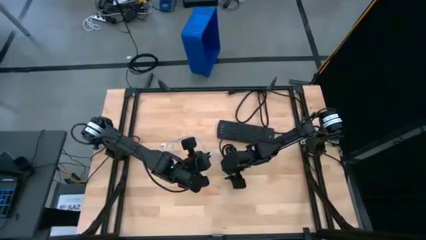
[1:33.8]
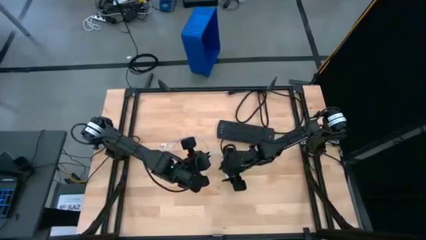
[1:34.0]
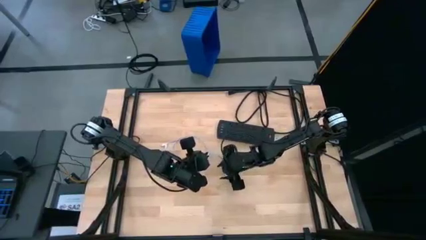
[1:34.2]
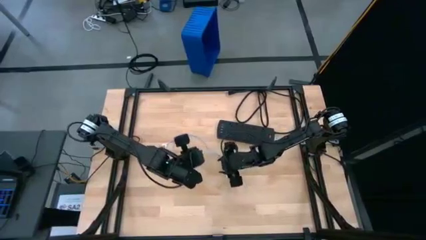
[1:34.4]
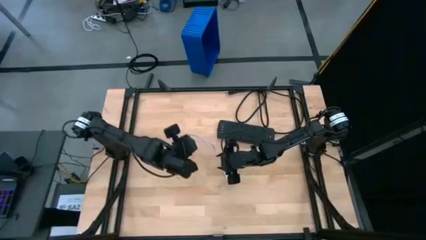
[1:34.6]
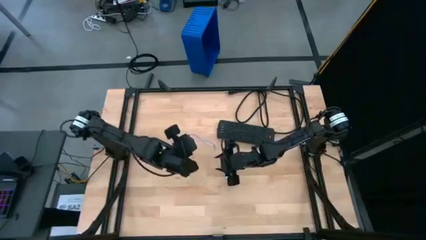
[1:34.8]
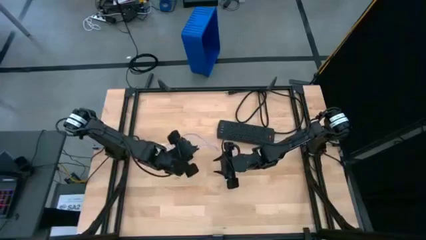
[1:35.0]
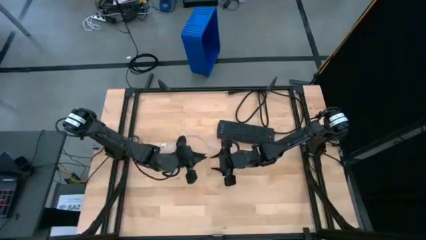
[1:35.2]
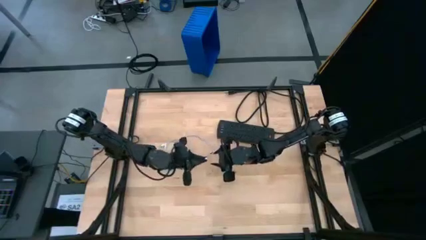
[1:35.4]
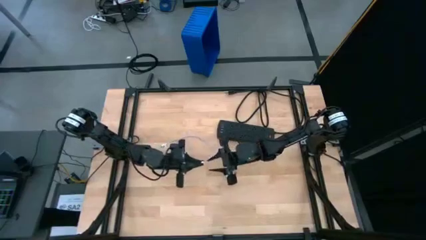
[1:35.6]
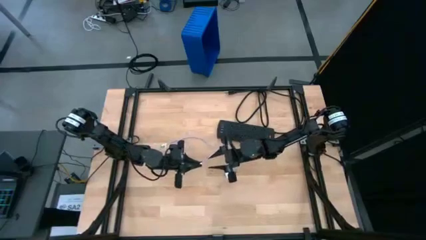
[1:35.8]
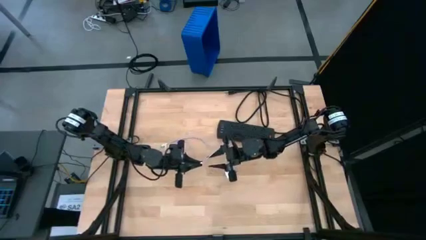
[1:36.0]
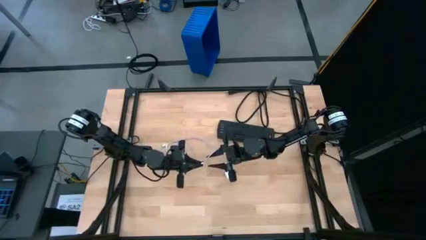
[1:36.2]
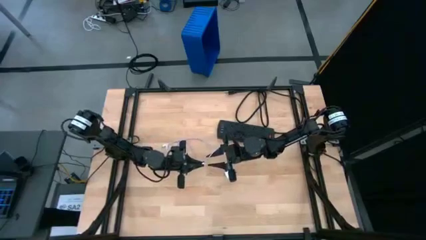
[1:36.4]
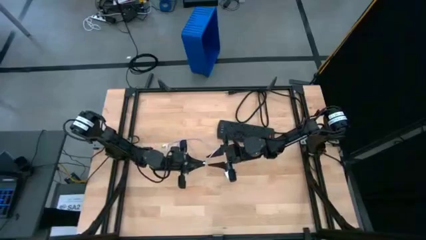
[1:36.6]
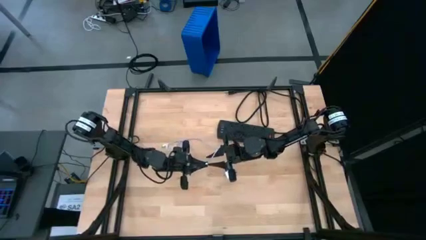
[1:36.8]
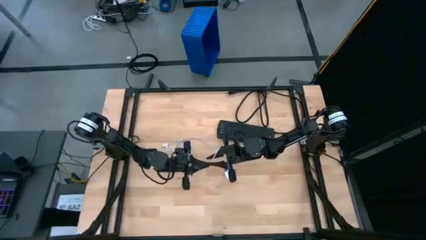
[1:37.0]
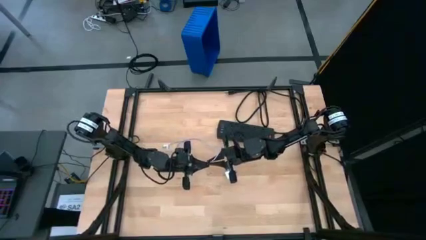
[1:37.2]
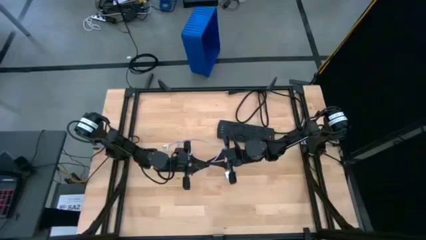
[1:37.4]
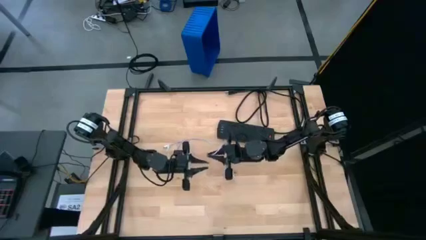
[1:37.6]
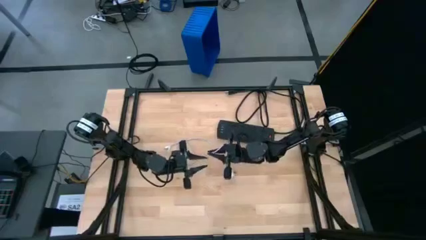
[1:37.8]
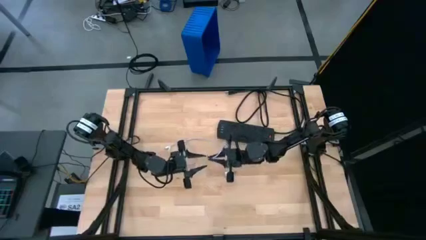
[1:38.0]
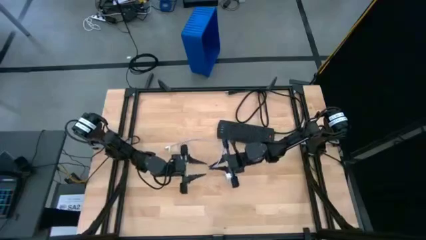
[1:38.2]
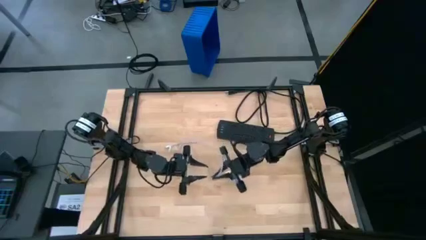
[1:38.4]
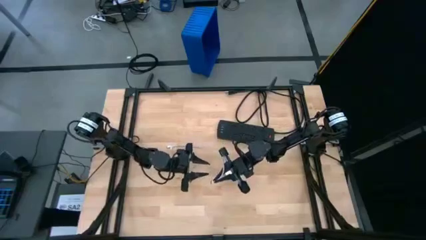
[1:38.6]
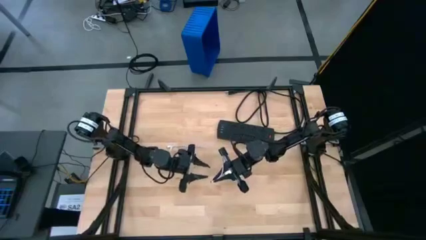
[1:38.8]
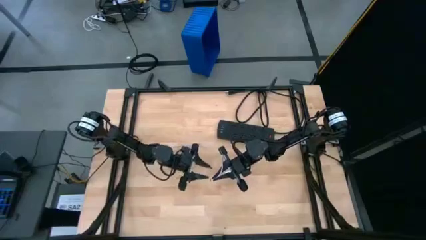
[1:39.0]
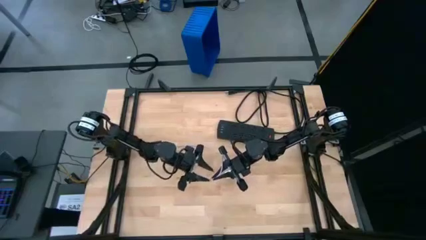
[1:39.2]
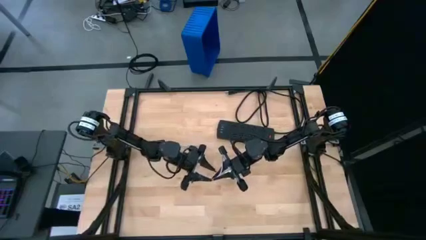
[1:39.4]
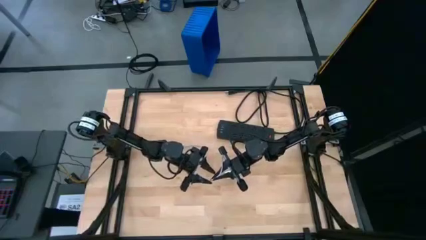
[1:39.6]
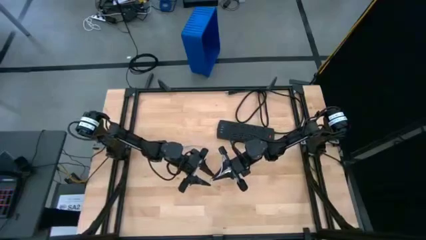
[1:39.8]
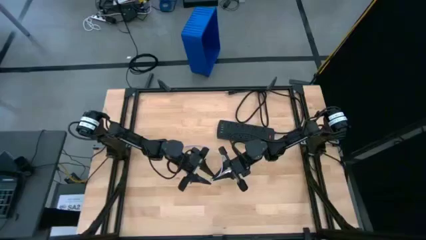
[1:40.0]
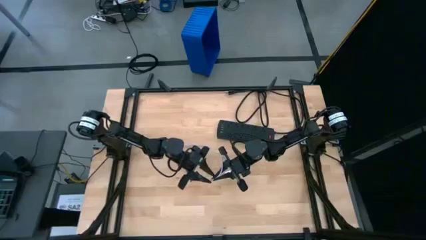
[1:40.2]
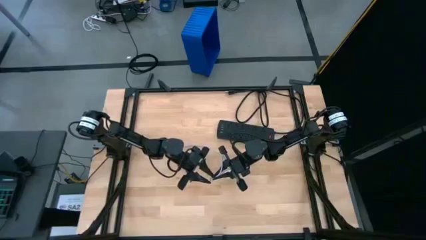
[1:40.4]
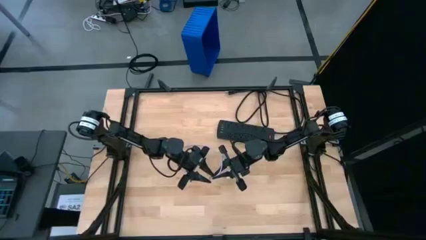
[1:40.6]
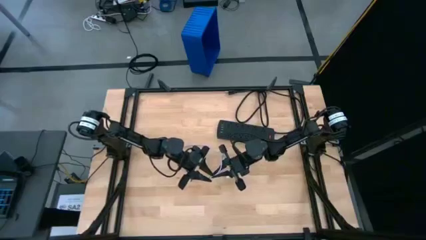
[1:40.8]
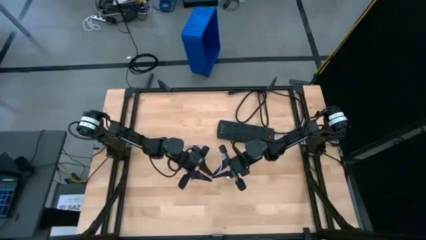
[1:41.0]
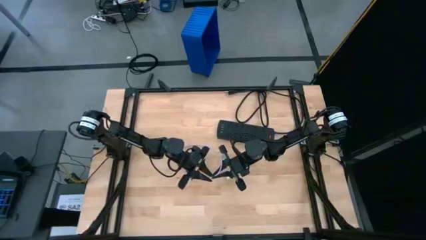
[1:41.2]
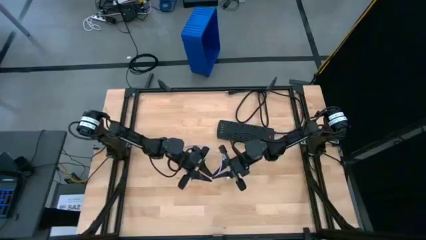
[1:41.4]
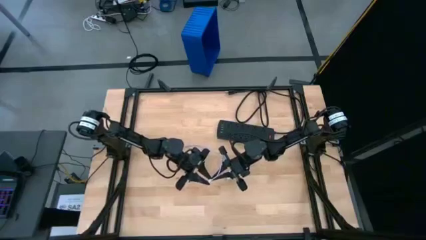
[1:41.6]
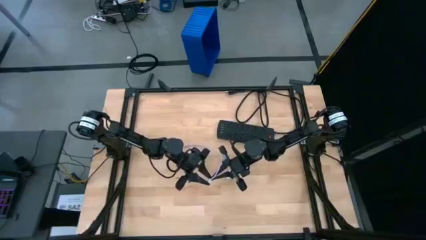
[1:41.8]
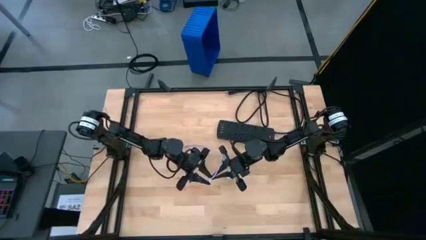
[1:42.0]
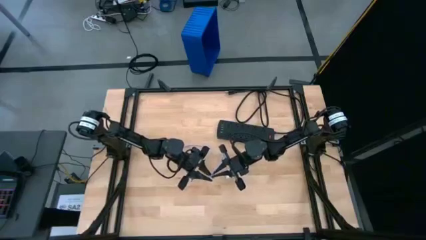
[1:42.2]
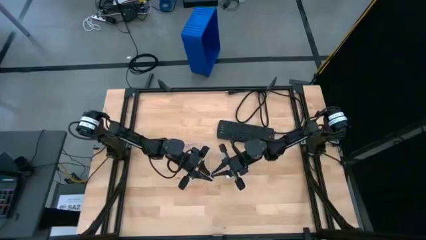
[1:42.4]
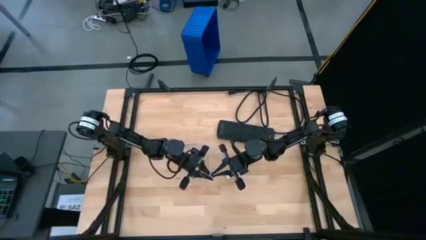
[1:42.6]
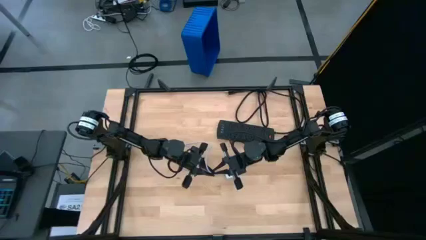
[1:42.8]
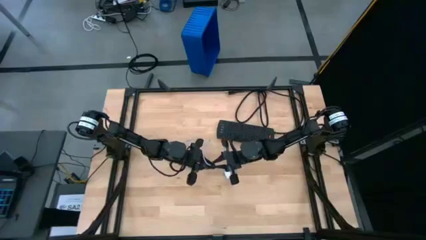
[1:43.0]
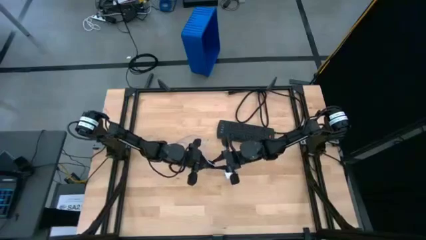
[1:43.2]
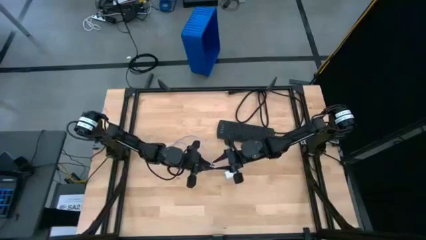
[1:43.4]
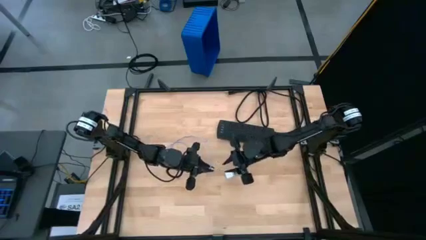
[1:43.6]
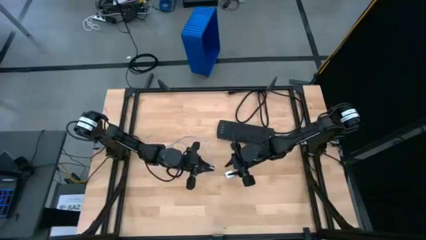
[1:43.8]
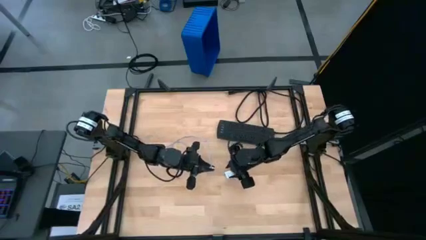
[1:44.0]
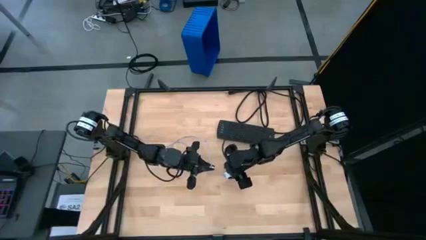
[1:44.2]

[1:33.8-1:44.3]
Task: Insert USB
Insert the white charger cable into the white charger adapter

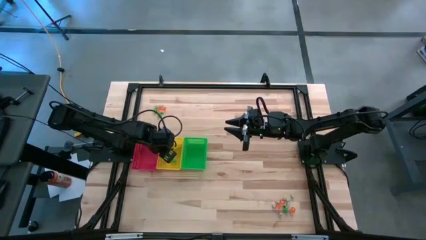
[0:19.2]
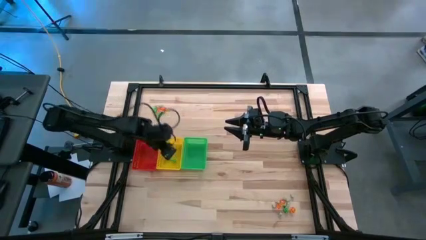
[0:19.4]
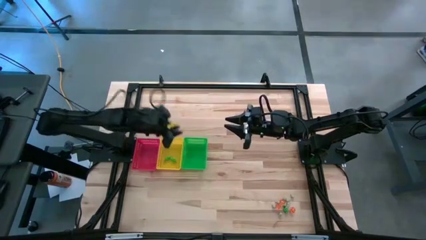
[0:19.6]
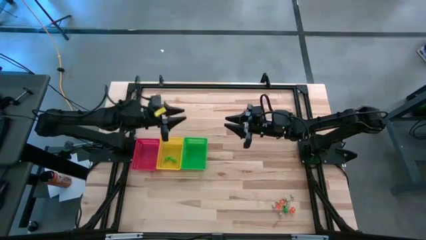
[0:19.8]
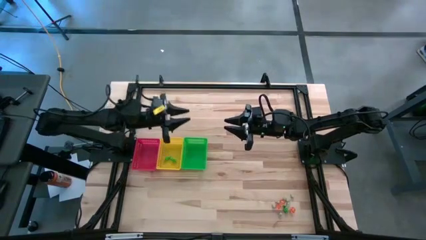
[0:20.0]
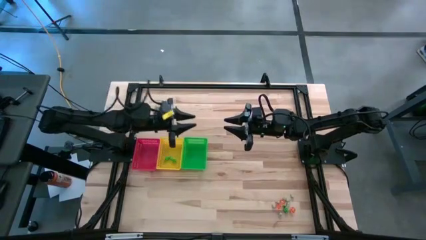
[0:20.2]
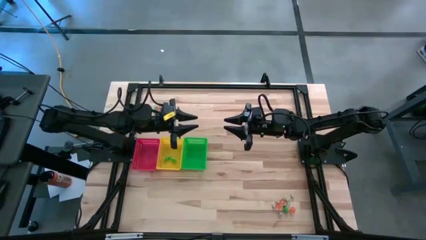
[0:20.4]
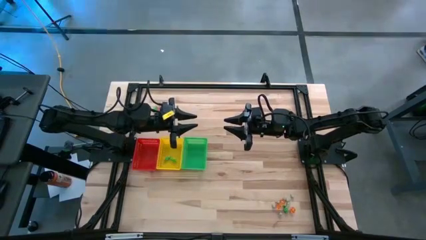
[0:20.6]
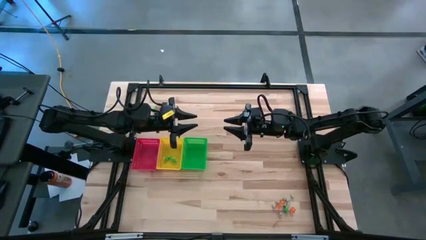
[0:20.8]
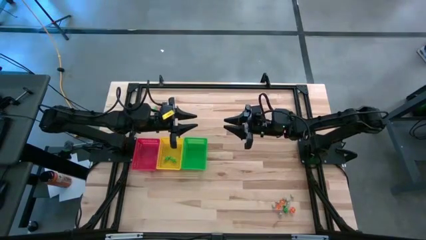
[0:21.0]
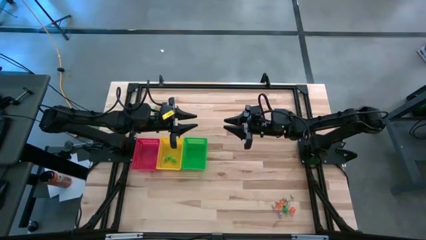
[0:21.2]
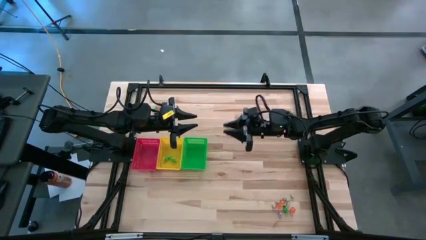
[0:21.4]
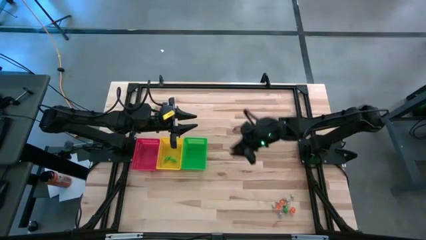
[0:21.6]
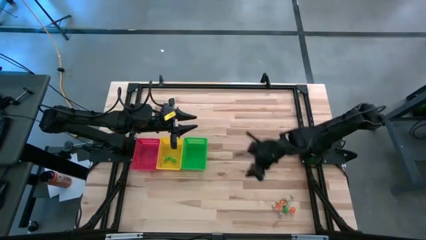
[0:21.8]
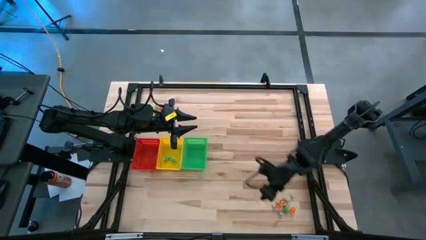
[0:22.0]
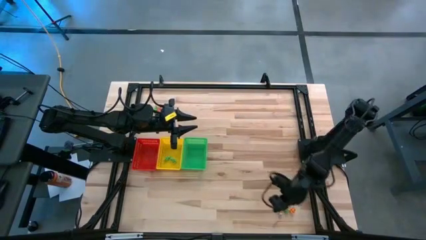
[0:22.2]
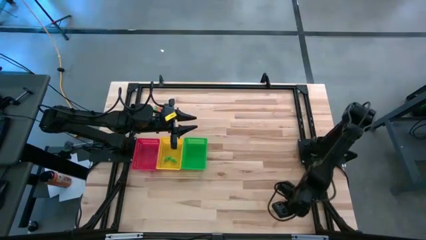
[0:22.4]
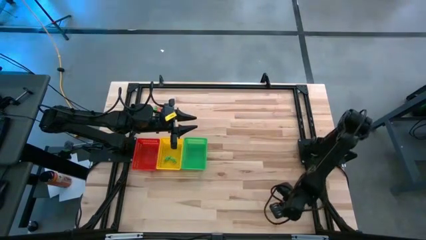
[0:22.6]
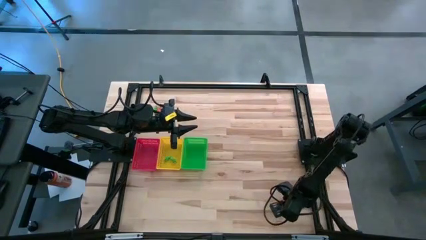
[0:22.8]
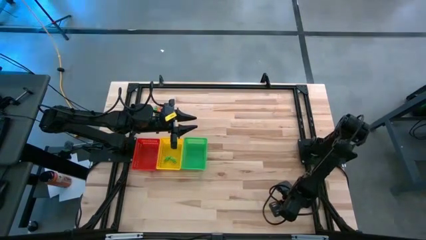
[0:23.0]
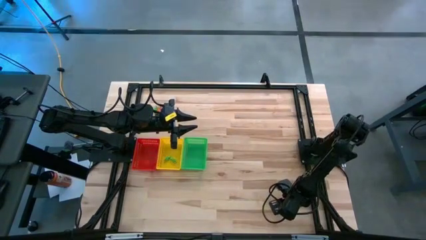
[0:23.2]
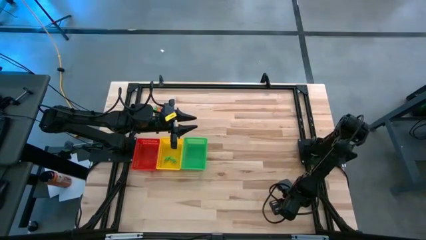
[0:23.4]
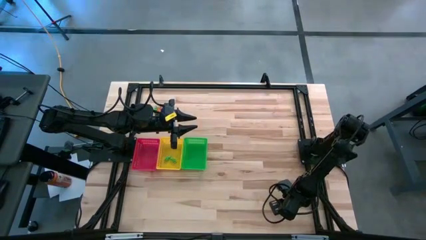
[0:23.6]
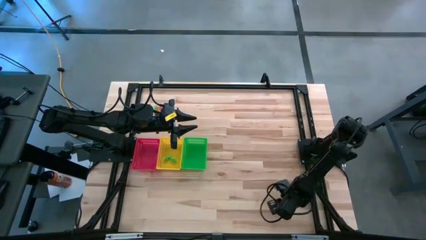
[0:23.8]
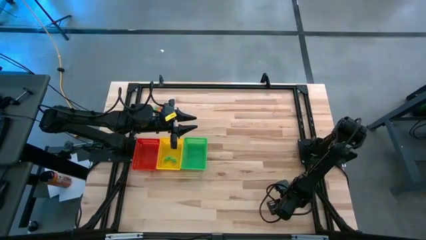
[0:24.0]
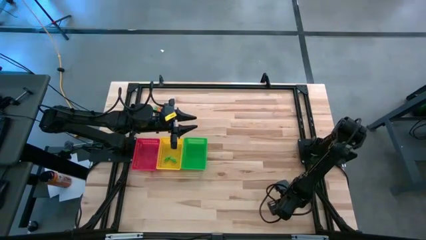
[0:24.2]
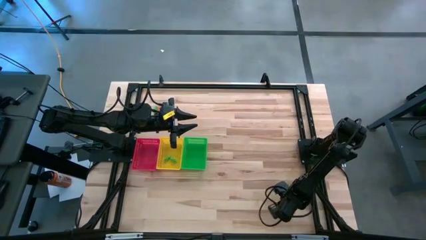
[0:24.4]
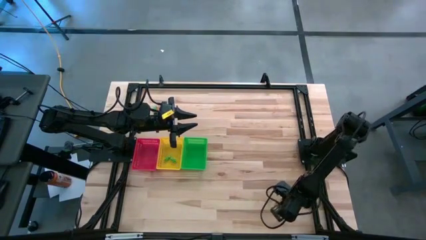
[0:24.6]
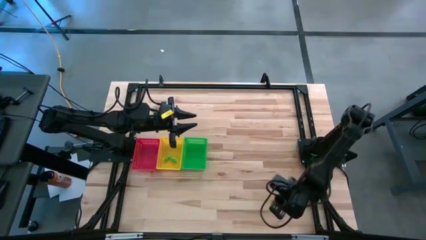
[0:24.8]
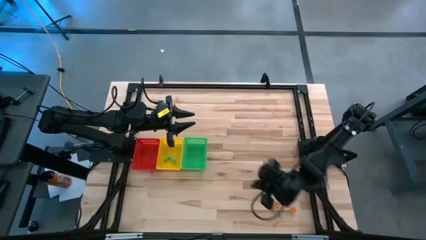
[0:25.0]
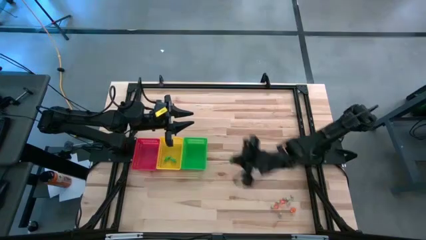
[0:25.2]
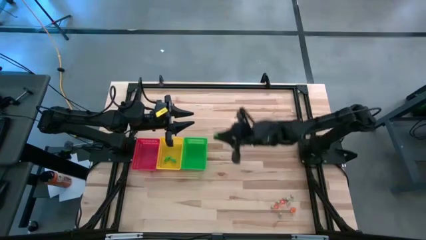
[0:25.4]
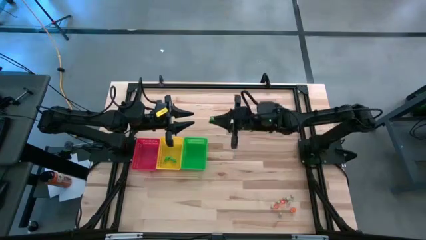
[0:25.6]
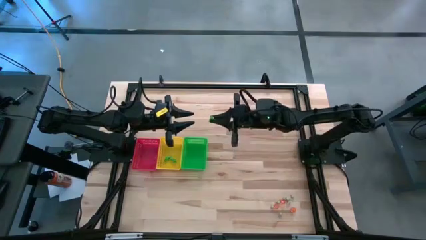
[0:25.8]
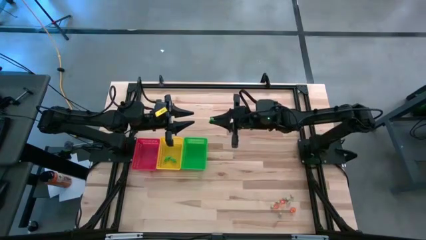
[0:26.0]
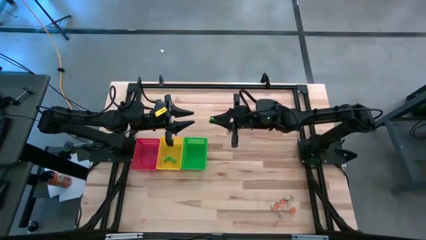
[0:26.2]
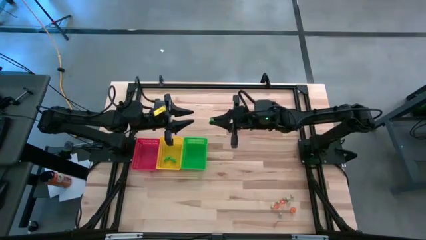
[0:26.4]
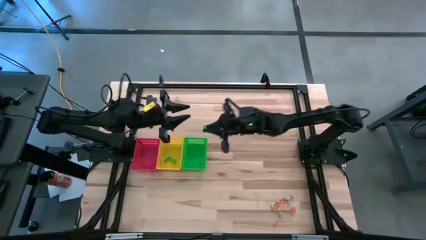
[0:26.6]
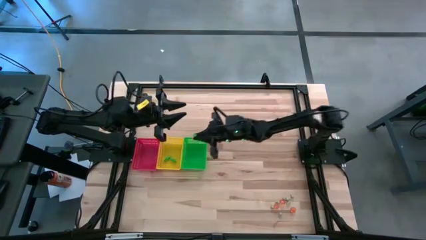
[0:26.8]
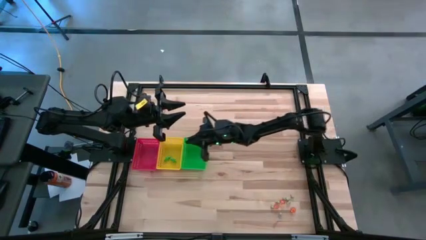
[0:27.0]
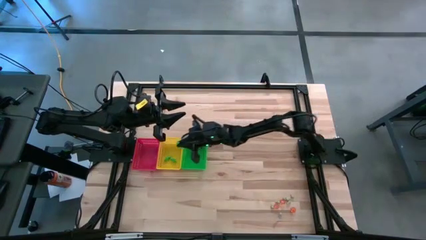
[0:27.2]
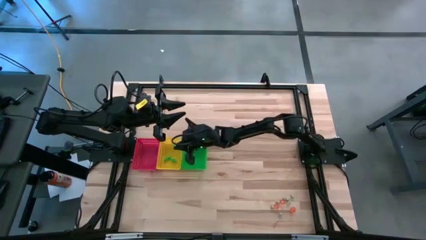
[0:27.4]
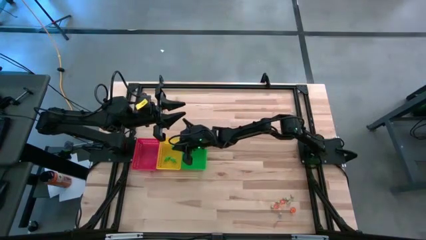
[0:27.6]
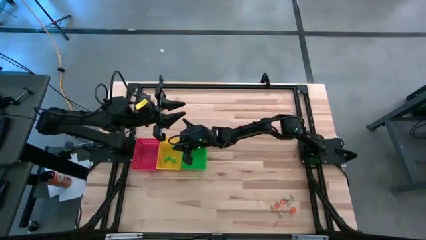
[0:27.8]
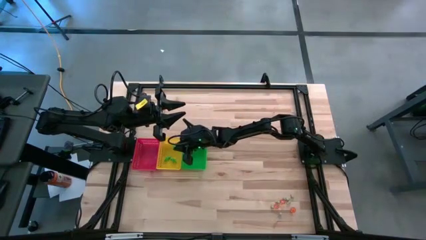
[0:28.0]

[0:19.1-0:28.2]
Task: Sort Halloween decoration
Put the green skeleton toy into the yellow bin
